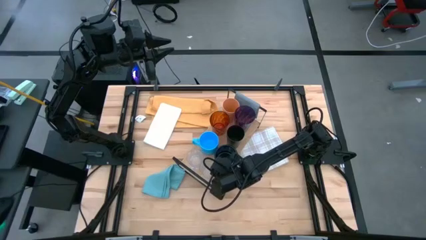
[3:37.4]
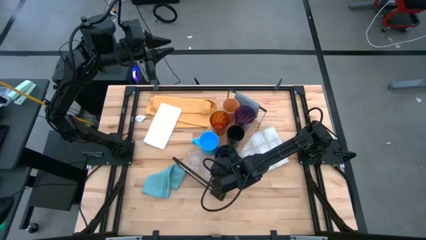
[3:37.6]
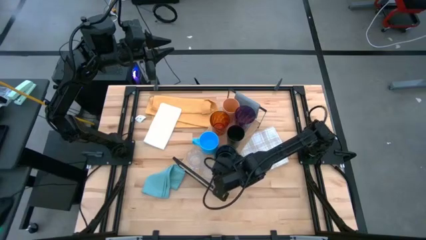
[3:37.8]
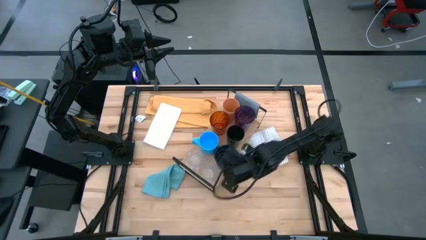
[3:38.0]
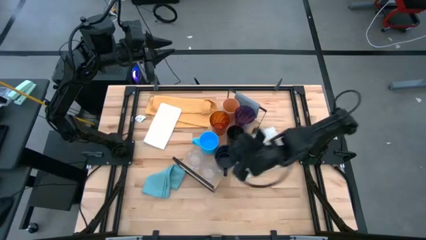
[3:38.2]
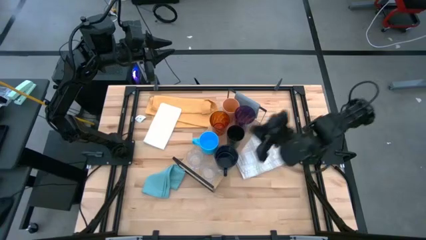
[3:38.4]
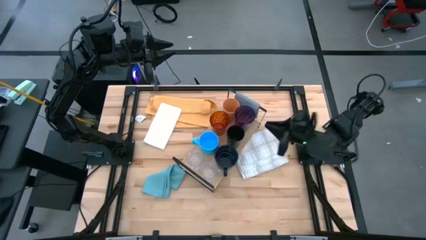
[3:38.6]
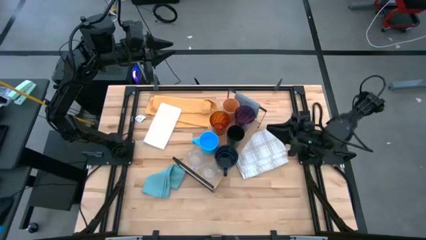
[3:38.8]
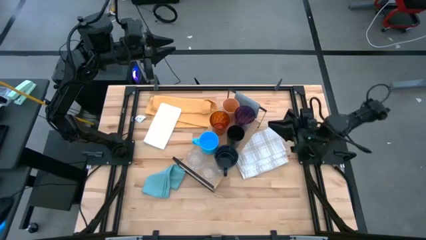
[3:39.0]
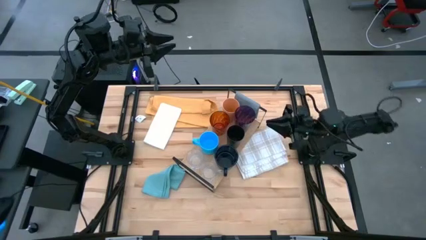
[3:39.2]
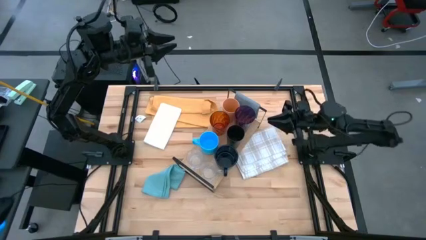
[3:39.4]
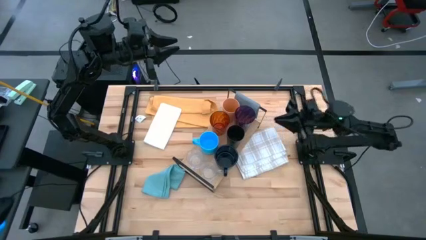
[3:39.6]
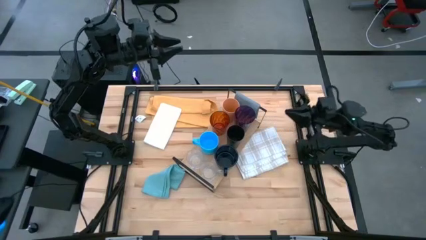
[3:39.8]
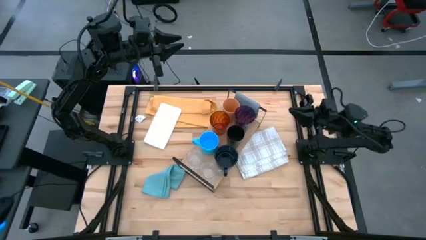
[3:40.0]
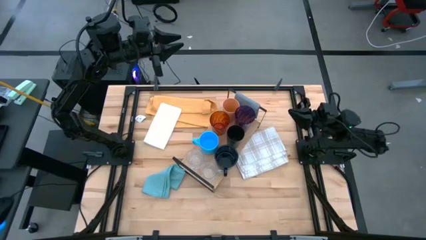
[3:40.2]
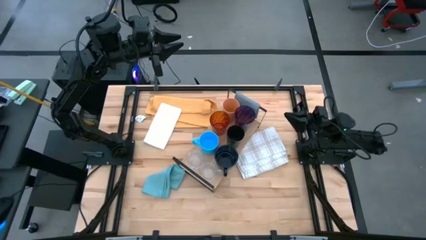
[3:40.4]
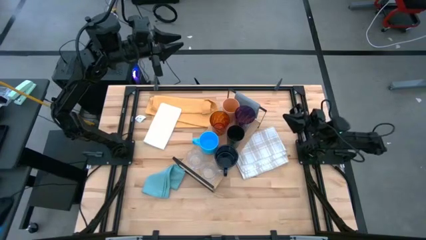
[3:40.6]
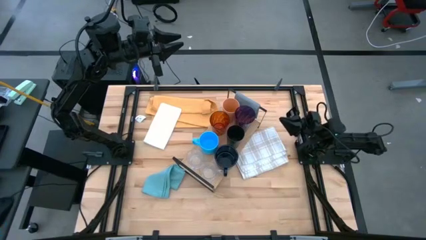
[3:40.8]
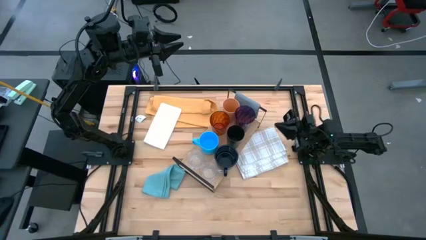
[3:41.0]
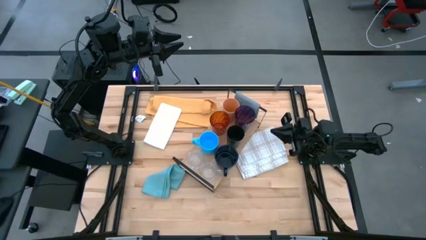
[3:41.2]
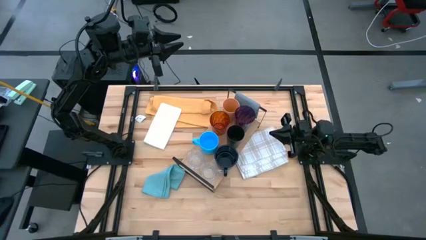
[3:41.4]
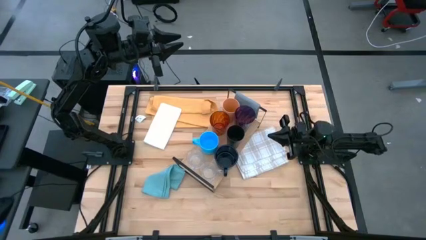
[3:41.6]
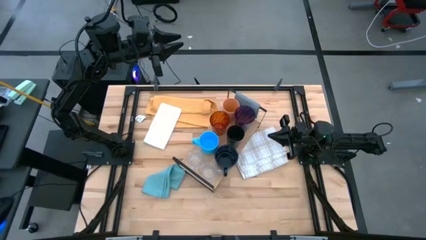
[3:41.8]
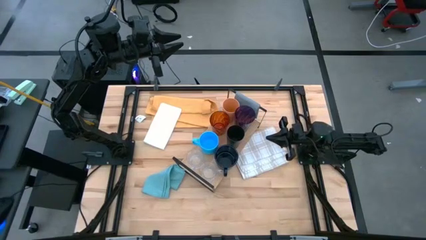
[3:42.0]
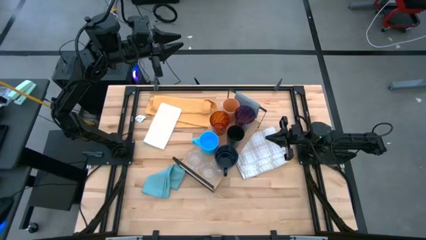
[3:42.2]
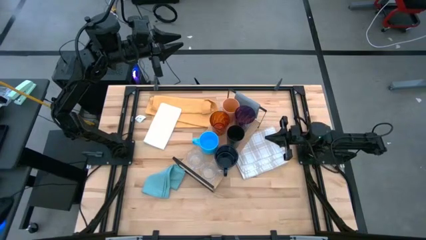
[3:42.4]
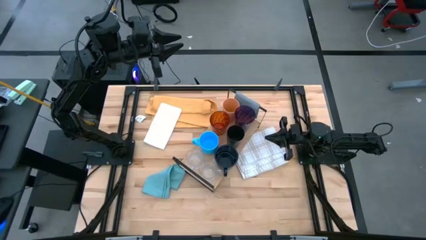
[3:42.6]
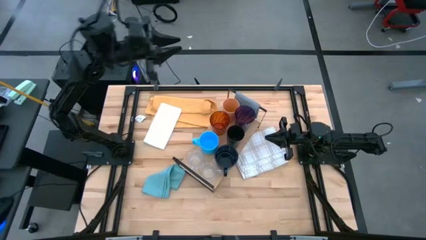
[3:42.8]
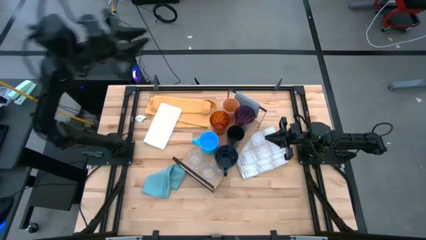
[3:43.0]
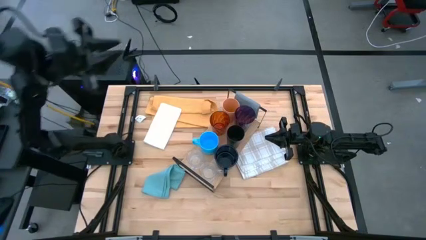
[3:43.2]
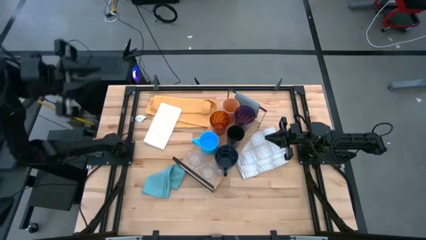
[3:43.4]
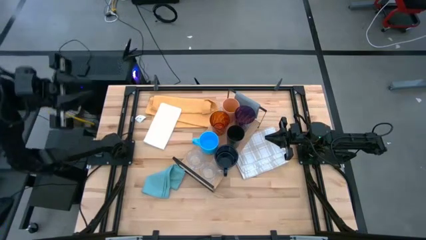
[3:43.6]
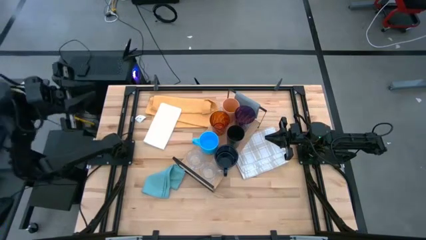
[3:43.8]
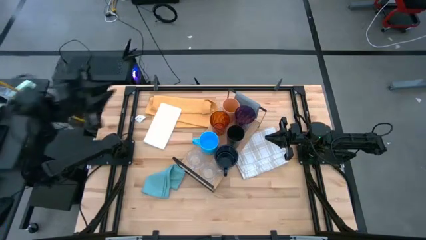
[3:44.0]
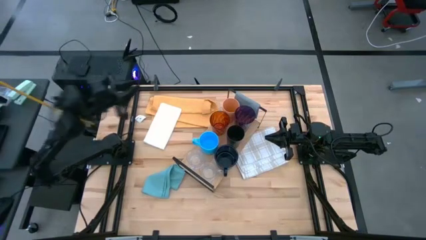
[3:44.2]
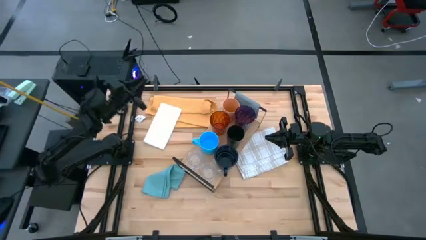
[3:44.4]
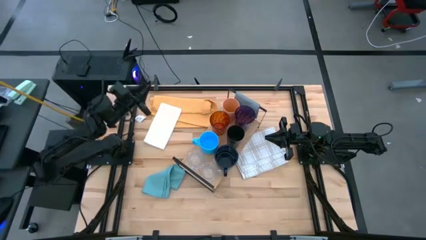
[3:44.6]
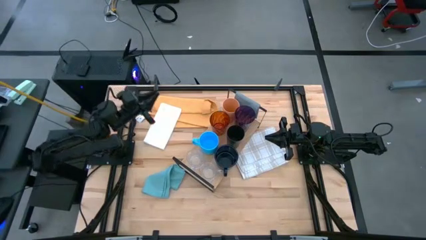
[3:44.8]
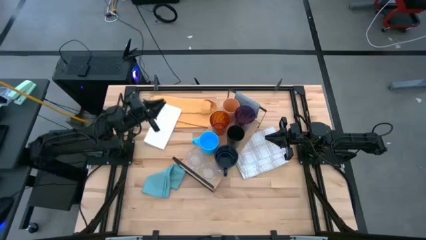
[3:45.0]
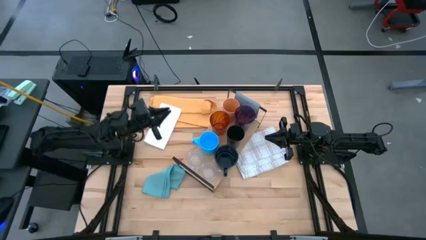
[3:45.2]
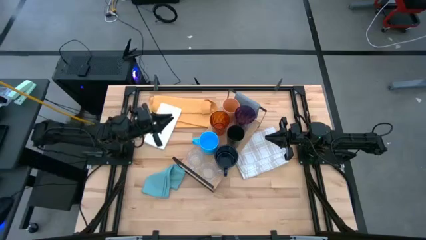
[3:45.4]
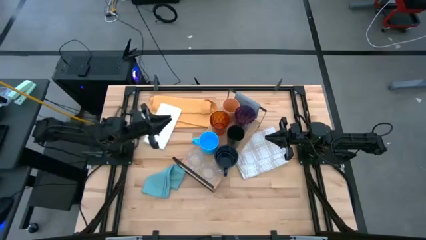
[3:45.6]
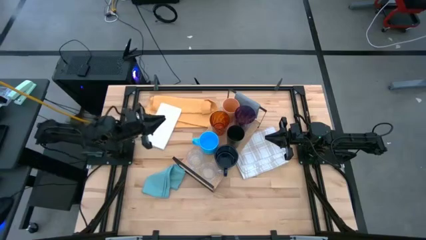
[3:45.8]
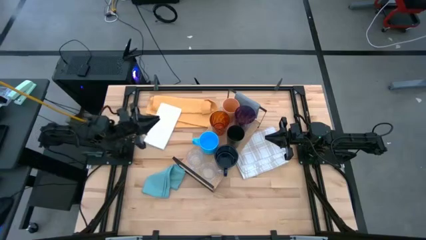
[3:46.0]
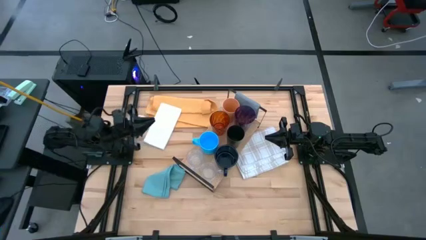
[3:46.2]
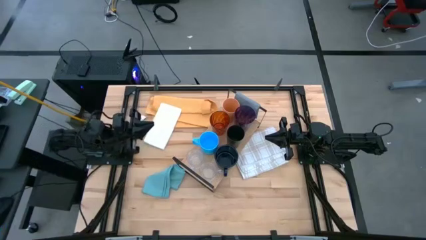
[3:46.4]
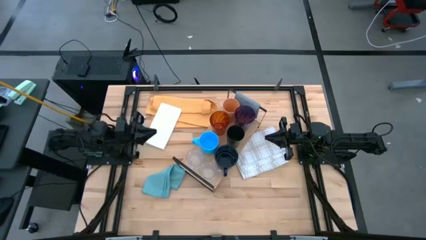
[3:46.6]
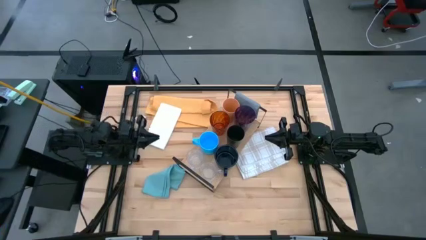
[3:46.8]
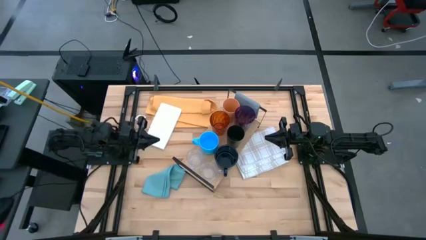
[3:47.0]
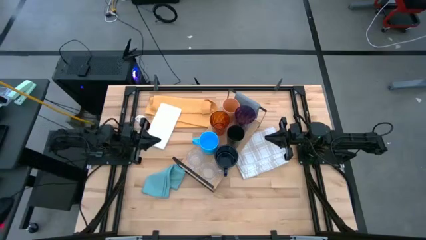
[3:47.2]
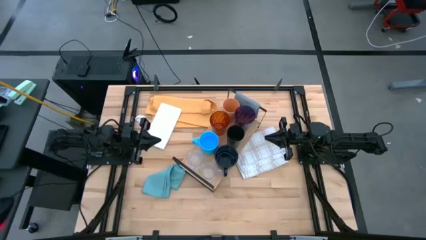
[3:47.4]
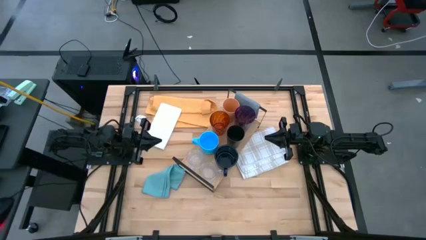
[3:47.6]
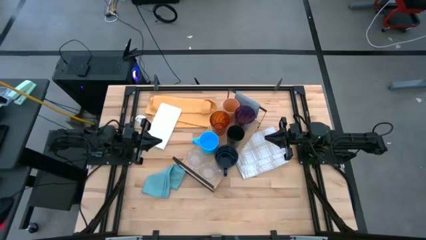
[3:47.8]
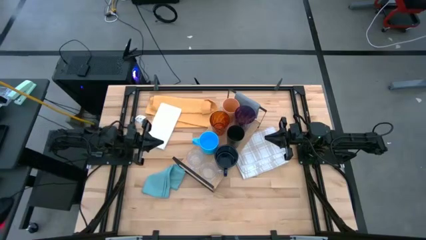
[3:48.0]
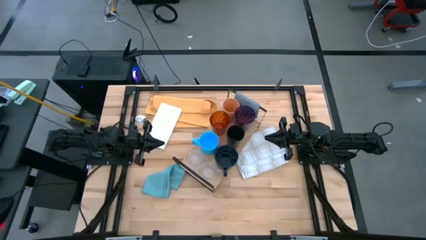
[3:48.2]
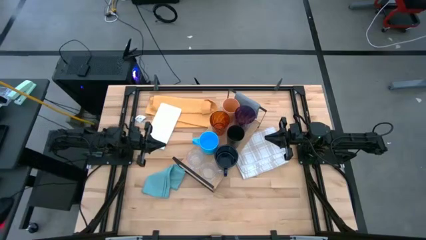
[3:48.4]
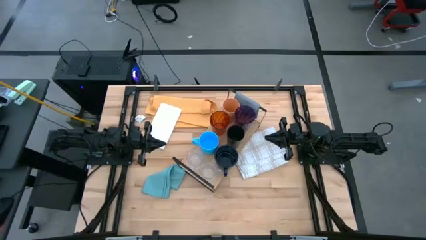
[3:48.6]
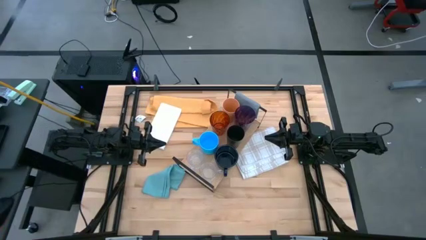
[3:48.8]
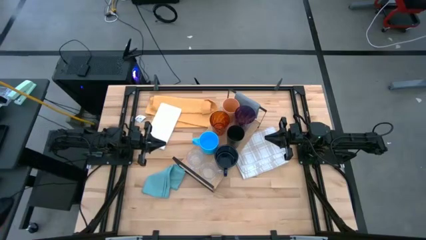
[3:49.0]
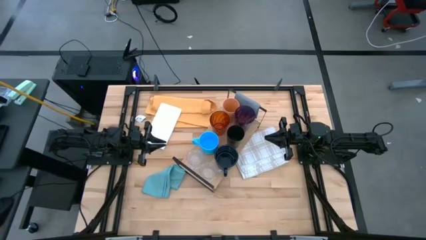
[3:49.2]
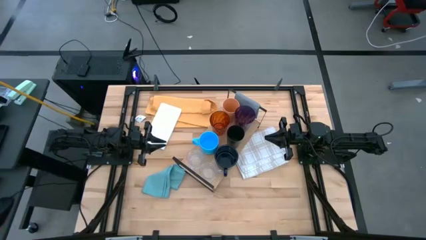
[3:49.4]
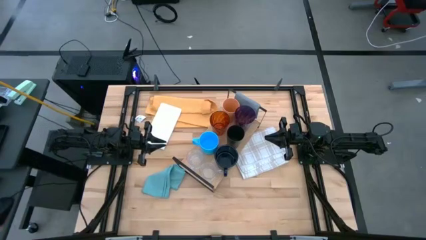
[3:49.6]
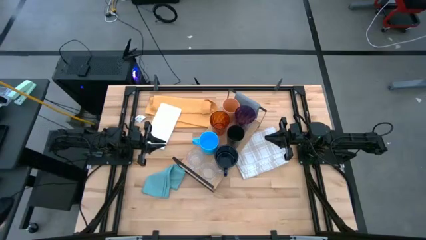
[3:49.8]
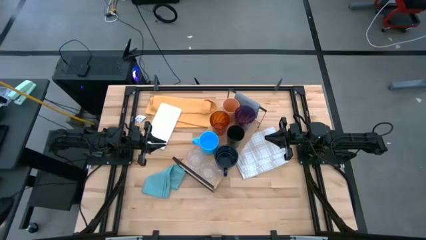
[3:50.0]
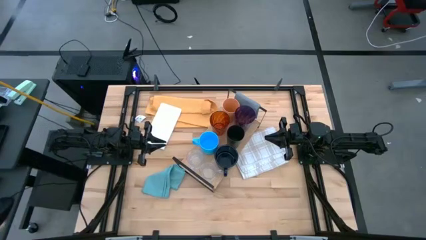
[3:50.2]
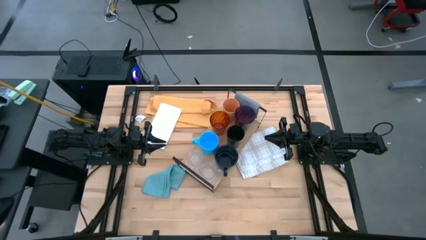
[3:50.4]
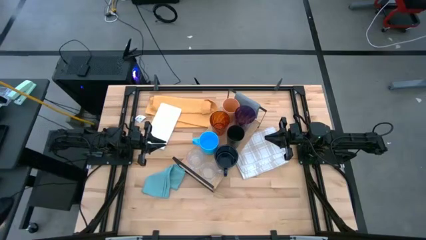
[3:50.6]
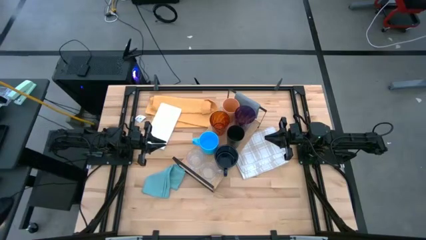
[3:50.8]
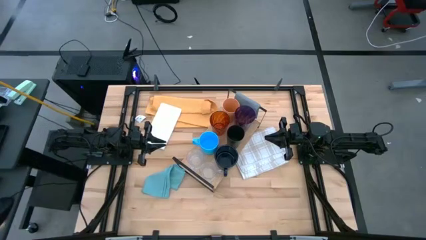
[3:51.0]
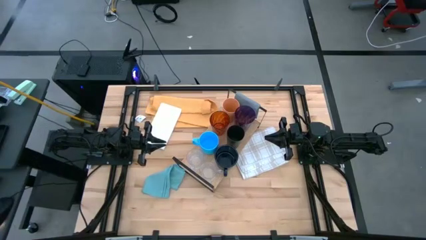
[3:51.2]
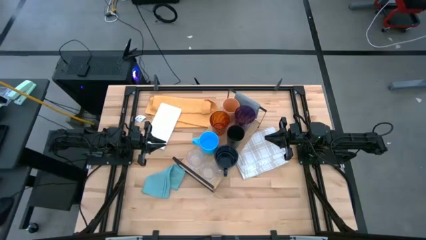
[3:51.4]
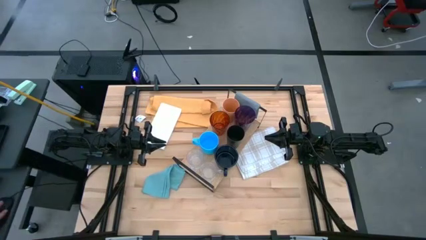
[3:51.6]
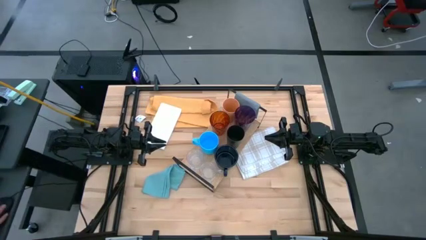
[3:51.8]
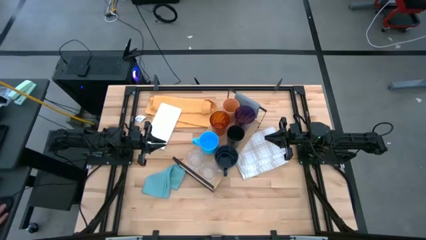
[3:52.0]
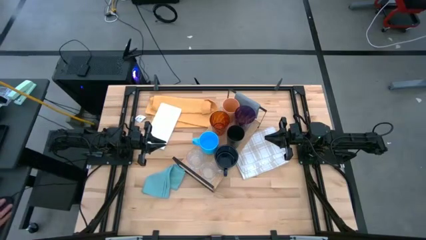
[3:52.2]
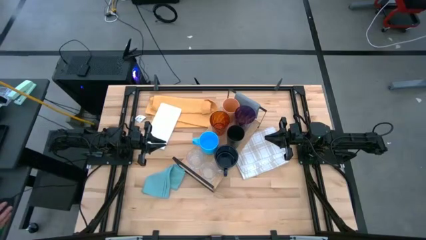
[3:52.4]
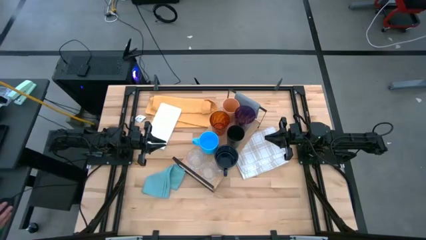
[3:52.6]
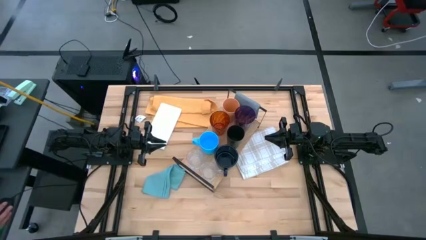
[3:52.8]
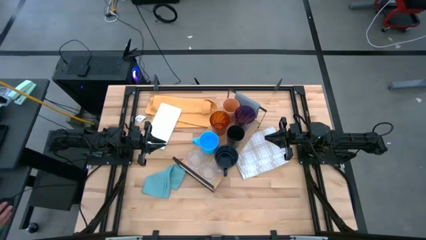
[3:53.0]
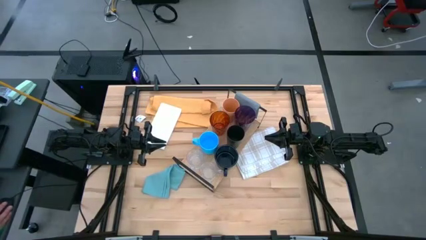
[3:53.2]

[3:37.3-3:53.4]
Task: Stack small to large cups/mugs on shelf
Return to Home Position

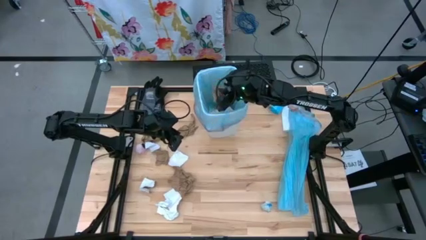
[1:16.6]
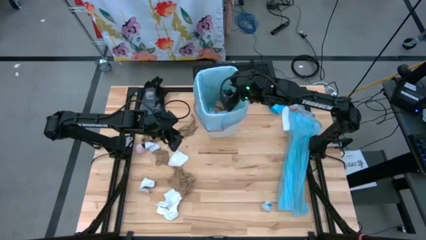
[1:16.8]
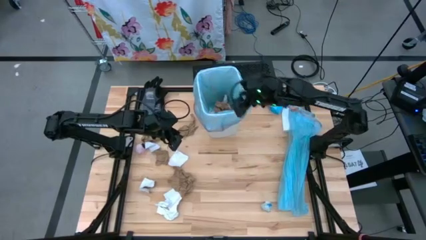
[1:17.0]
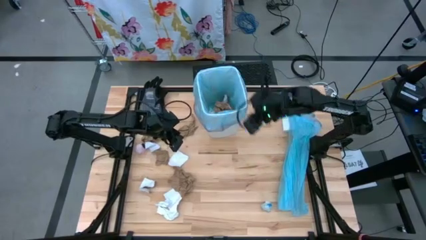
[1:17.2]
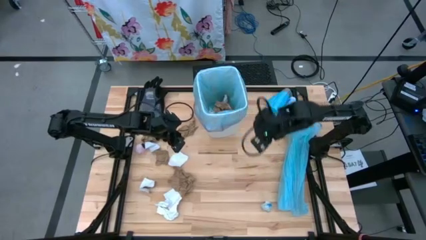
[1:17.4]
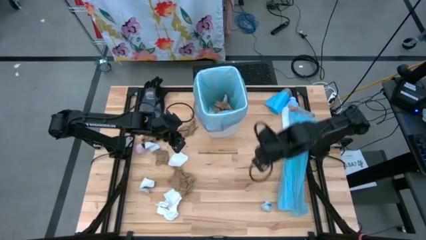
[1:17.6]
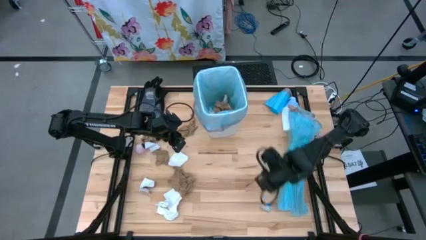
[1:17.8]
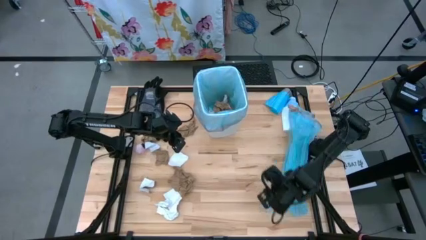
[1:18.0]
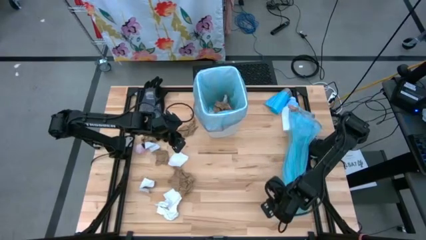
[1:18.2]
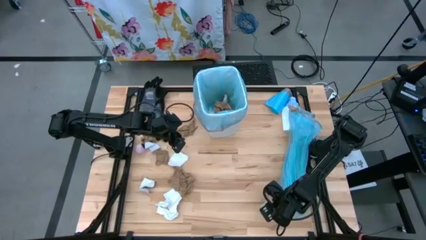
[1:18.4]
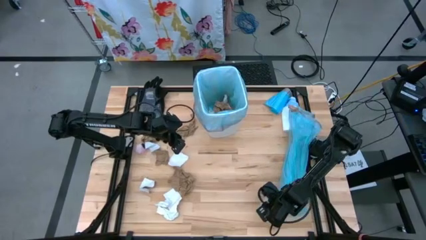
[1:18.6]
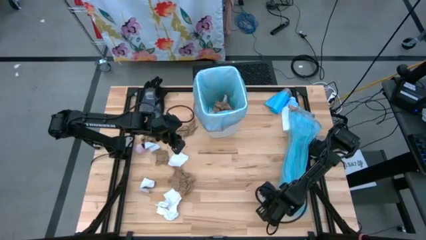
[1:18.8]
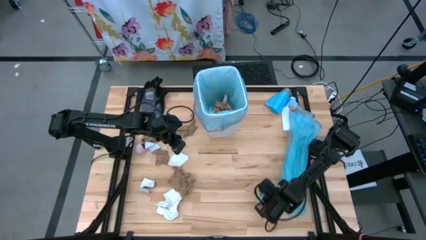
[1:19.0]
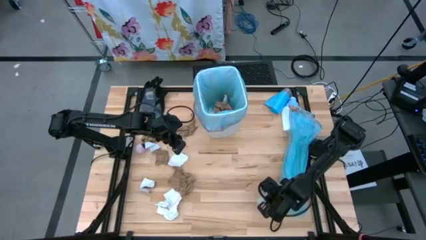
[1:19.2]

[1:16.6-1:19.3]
Task: place trash/remove bag and relplace
Put the blue plastic into the trash bin
